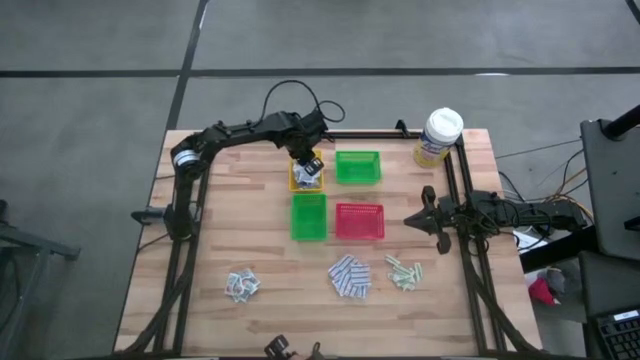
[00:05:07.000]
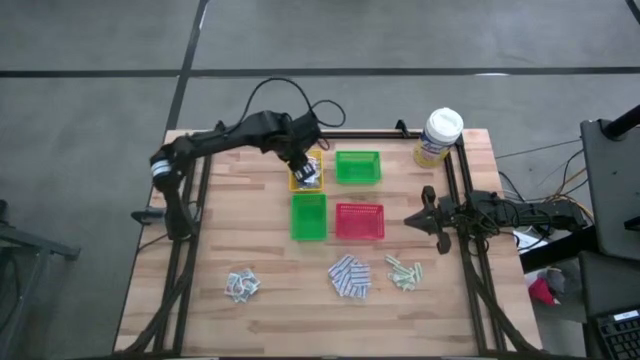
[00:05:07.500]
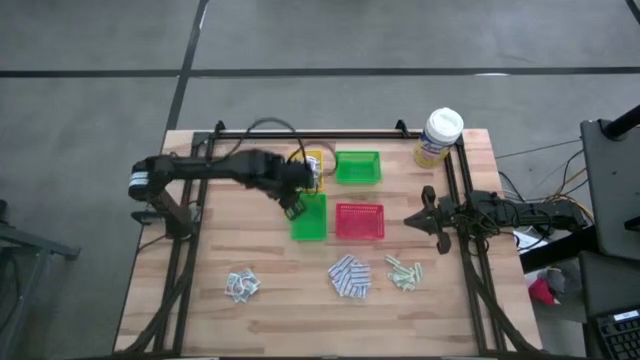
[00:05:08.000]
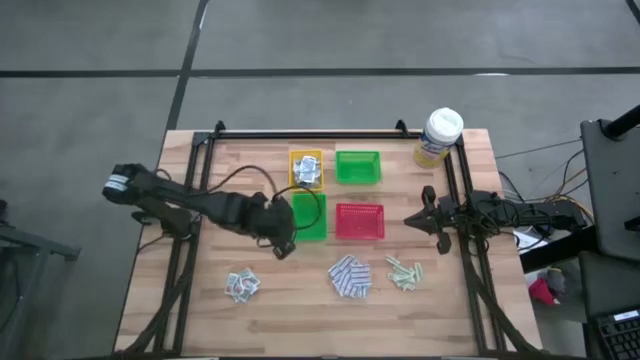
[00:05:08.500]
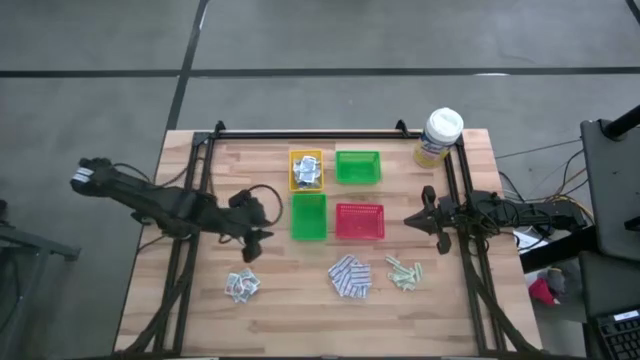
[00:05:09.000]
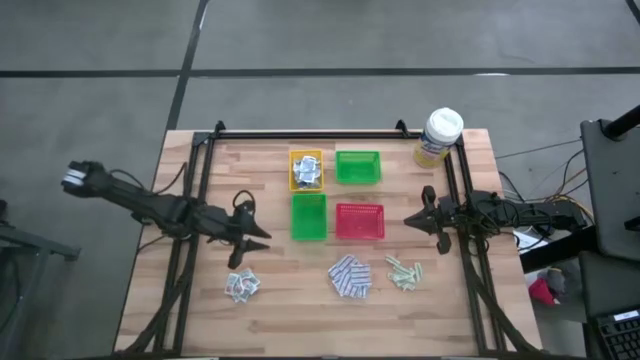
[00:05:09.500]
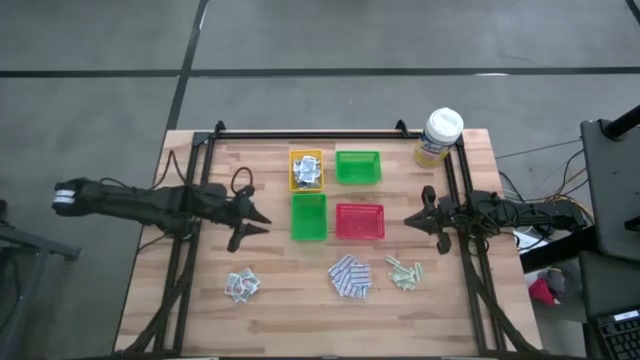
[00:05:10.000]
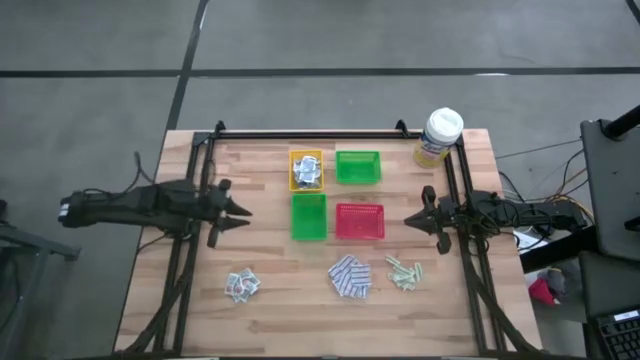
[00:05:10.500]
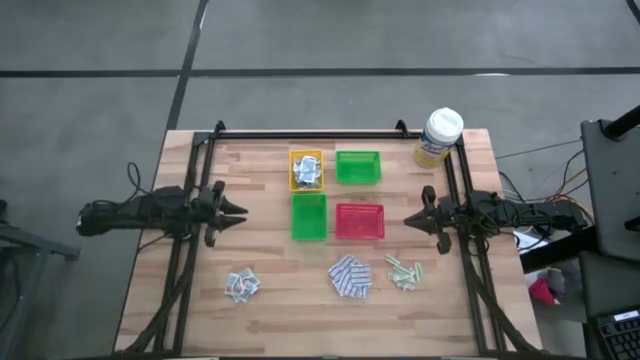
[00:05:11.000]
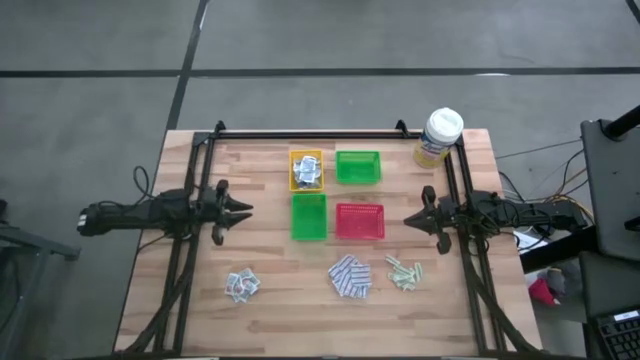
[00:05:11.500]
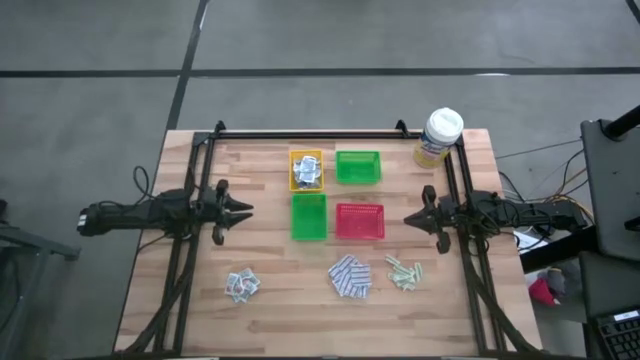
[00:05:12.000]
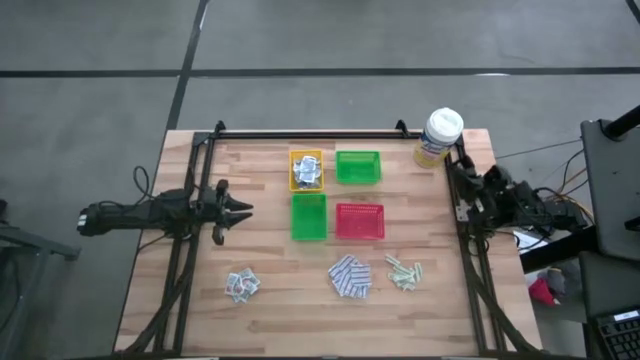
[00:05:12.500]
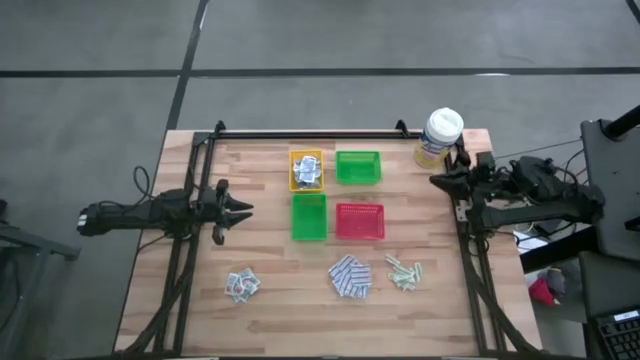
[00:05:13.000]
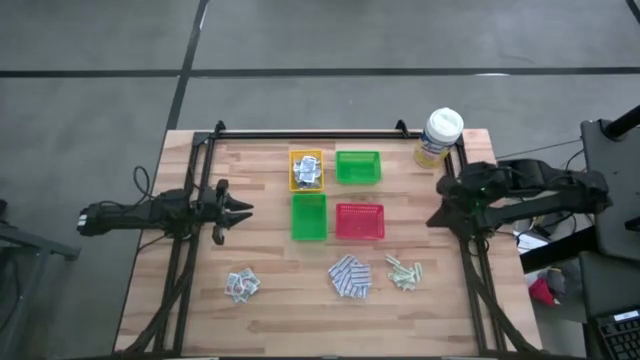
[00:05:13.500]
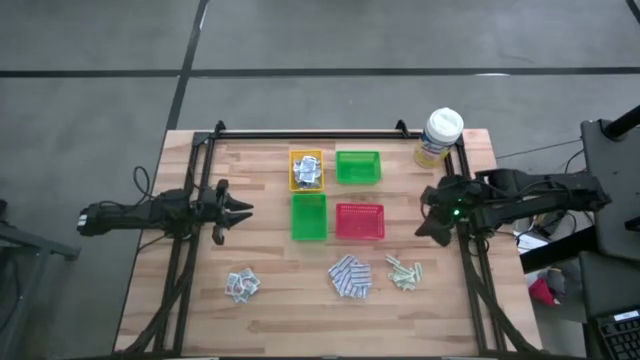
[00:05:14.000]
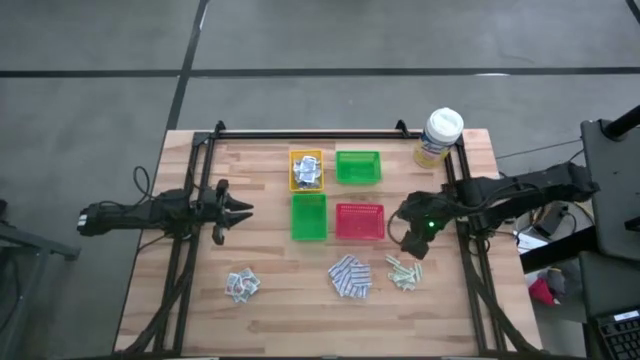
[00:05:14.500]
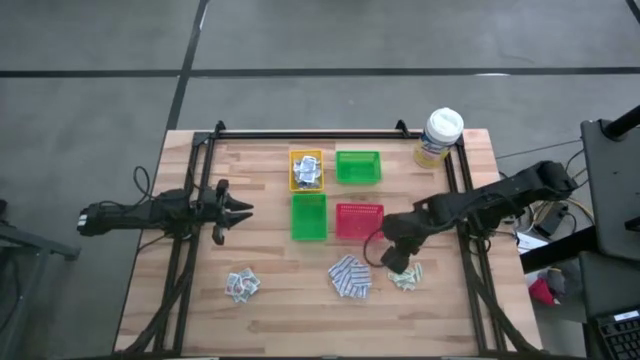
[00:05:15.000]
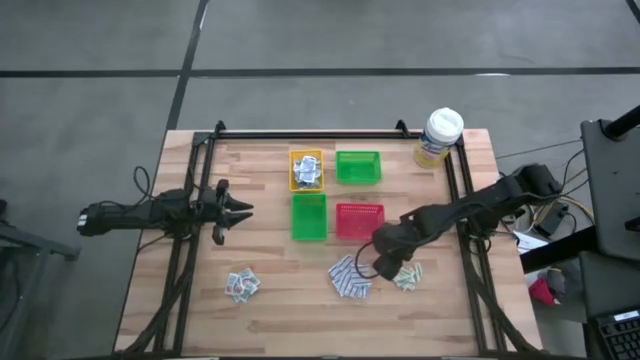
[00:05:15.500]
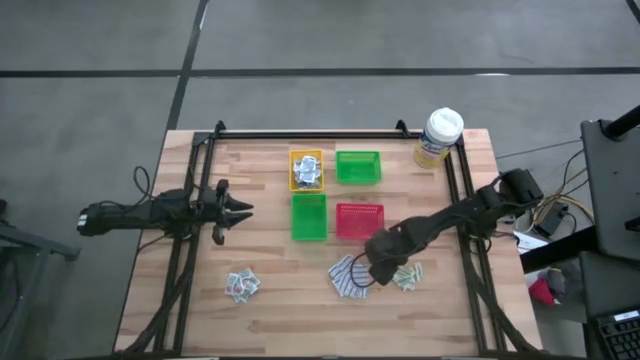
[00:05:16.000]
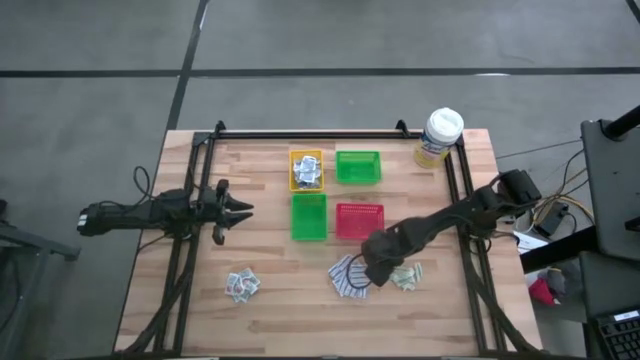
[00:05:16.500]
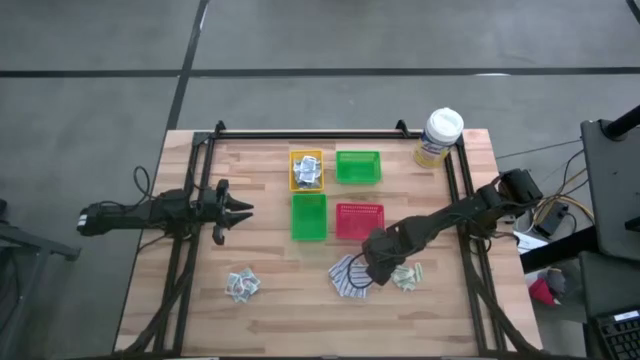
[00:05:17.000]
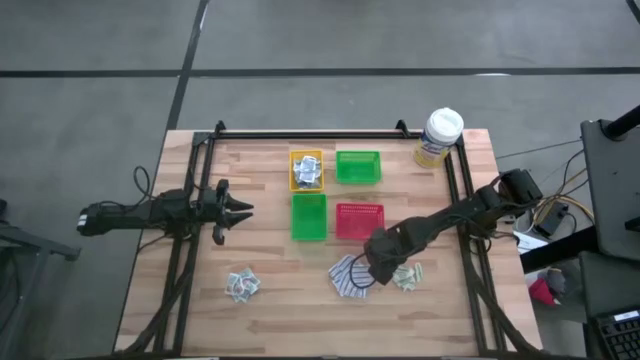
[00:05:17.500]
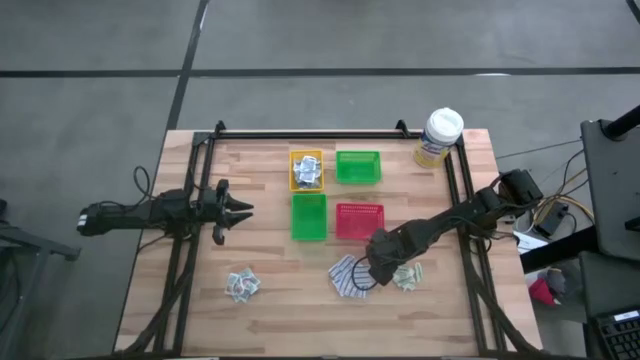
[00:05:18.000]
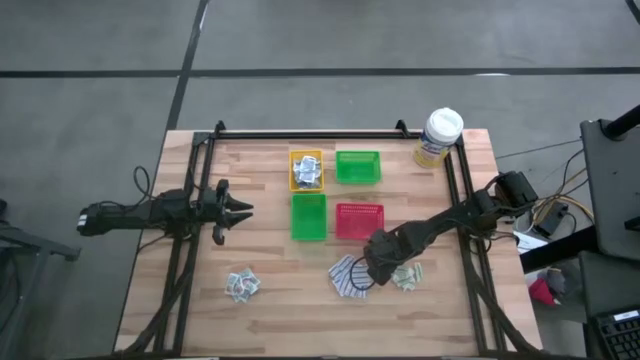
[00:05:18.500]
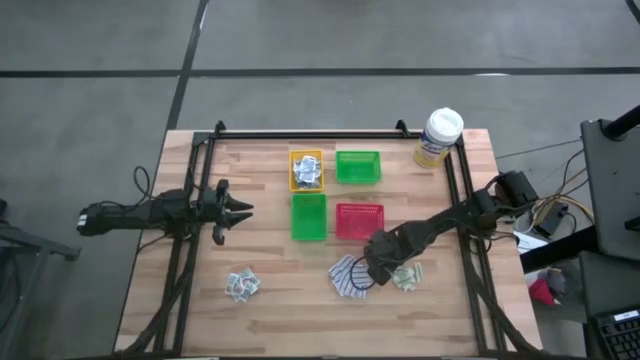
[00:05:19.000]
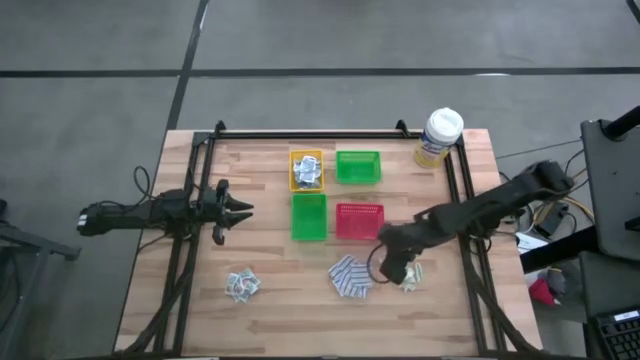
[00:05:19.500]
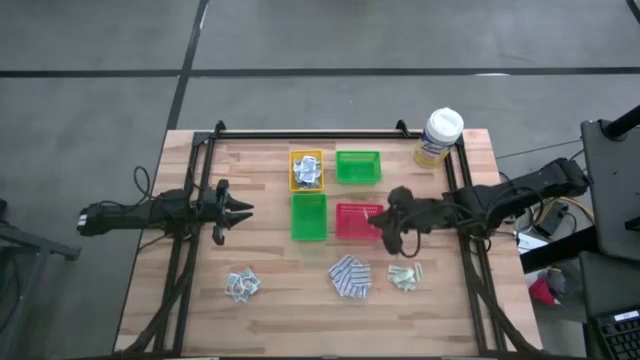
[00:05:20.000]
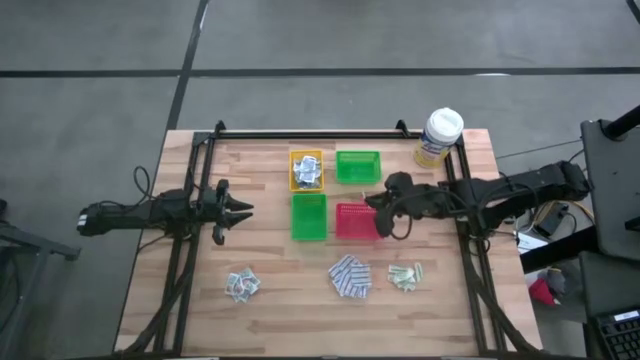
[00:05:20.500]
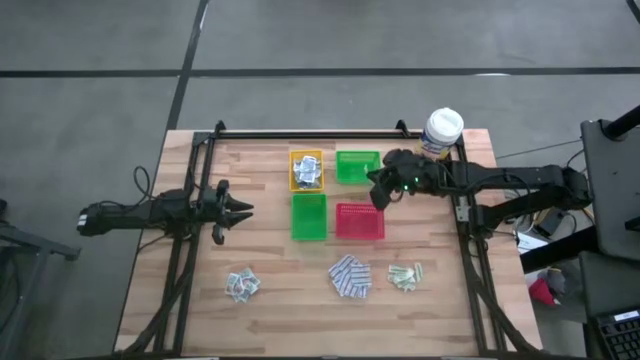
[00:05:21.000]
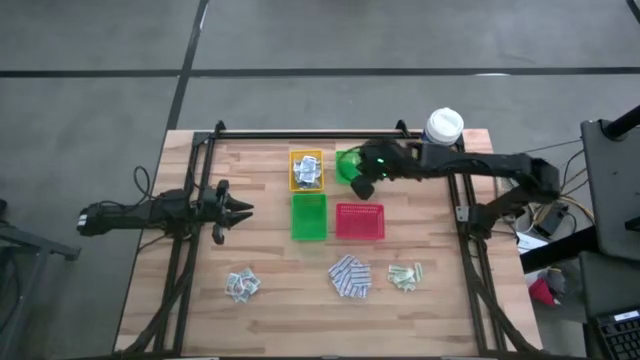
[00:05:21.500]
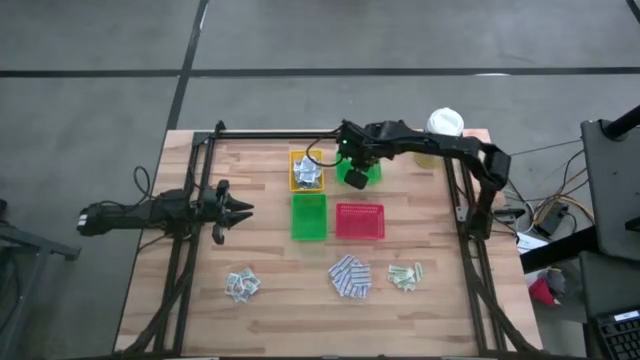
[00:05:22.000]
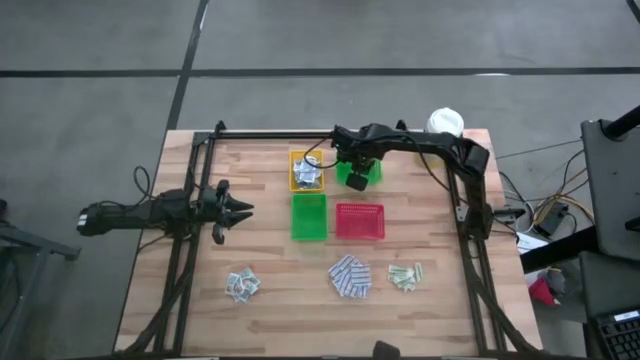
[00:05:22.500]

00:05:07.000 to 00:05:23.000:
Task: Pick & Place First Aid Supplies
Put the green bandage pack into the top green bin

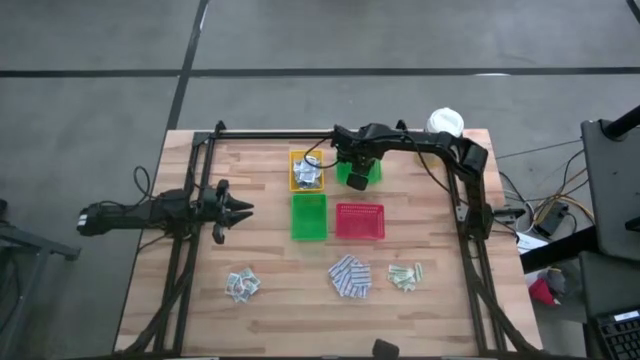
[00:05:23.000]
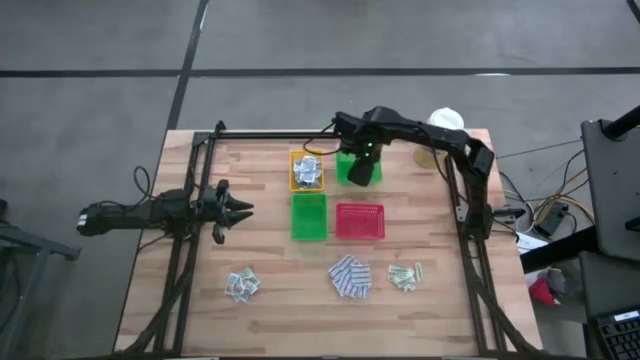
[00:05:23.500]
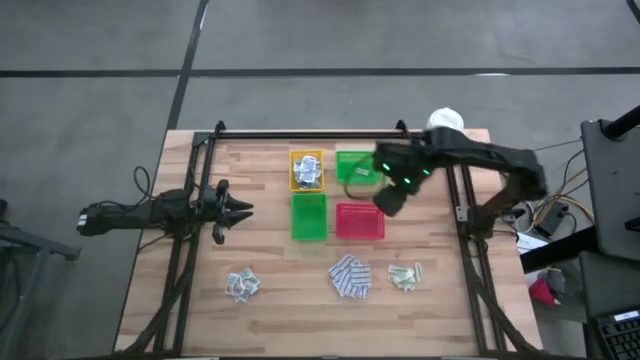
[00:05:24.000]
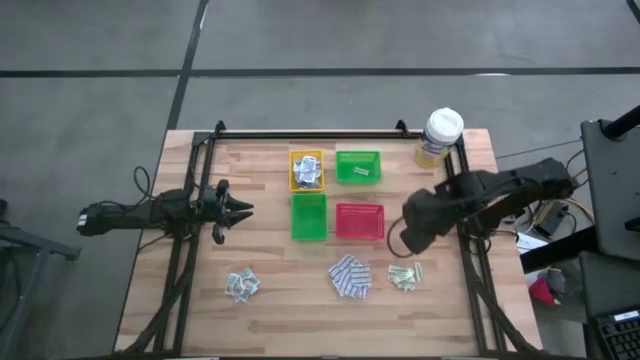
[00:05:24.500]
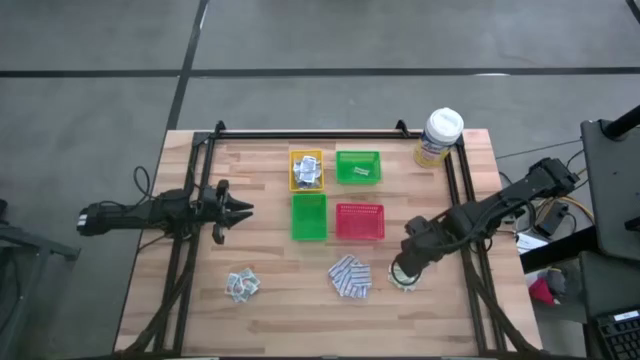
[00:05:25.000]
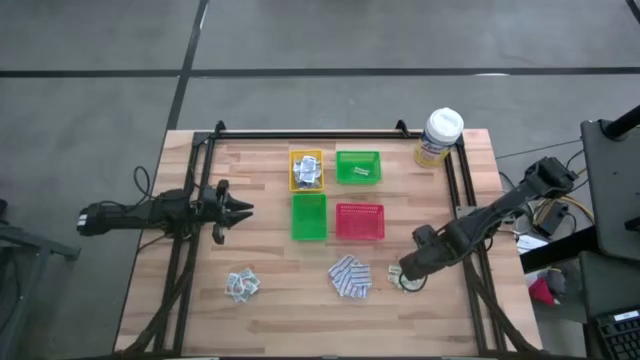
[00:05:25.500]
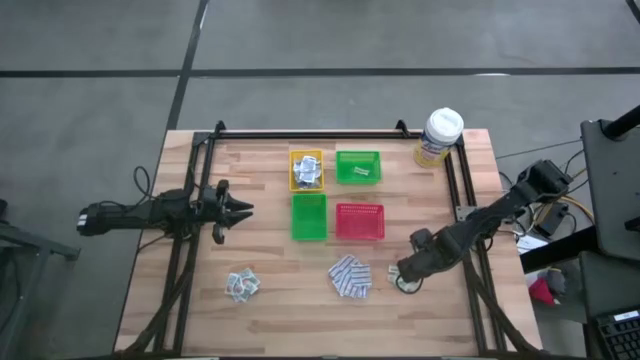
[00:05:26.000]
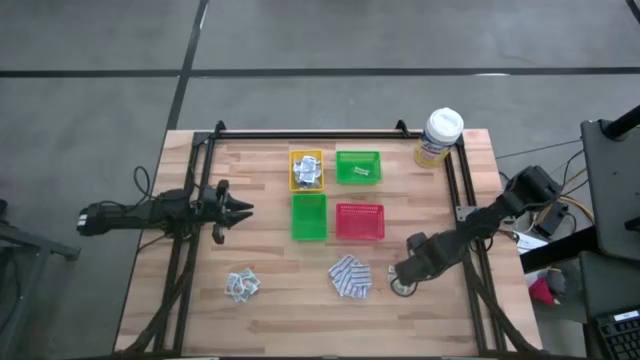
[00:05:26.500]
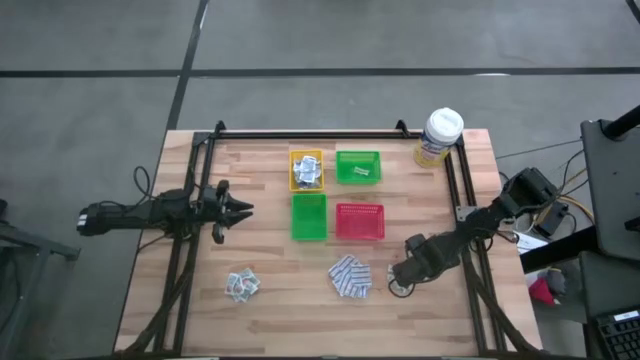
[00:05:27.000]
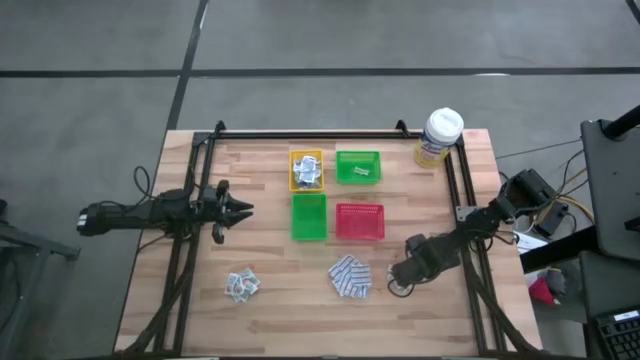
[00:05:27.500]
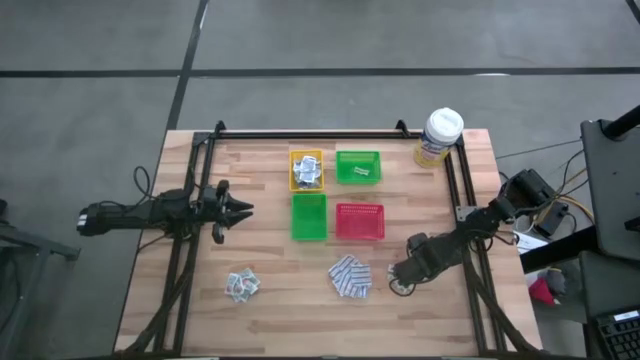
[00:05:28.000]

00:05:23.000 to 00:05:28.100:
Put the green bandage pack into the top green bin
